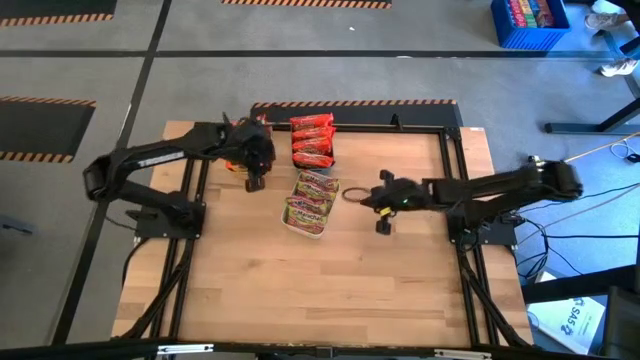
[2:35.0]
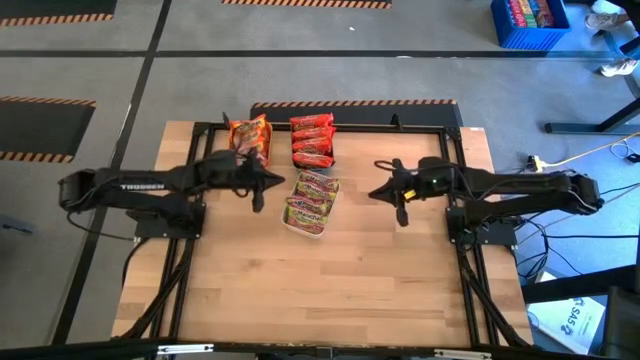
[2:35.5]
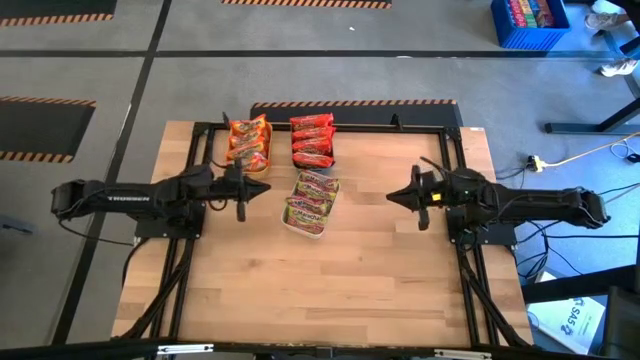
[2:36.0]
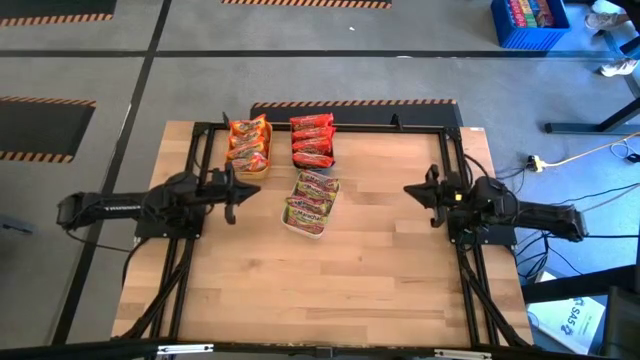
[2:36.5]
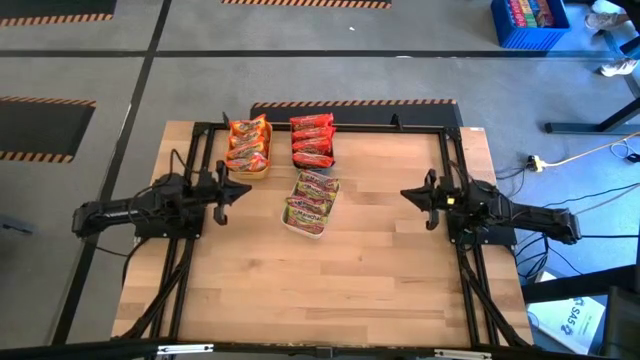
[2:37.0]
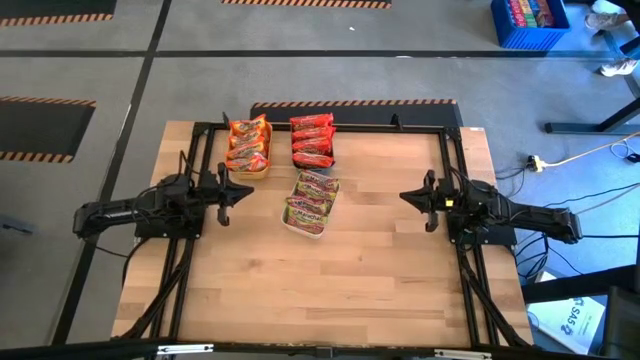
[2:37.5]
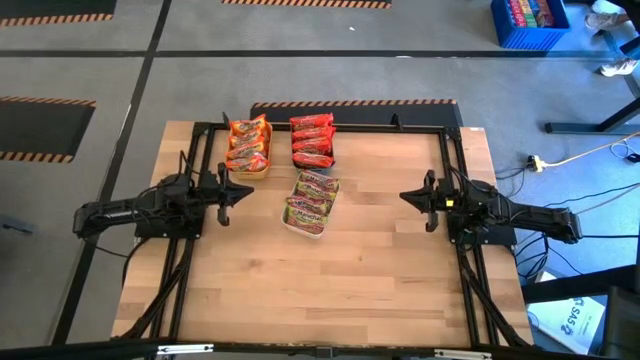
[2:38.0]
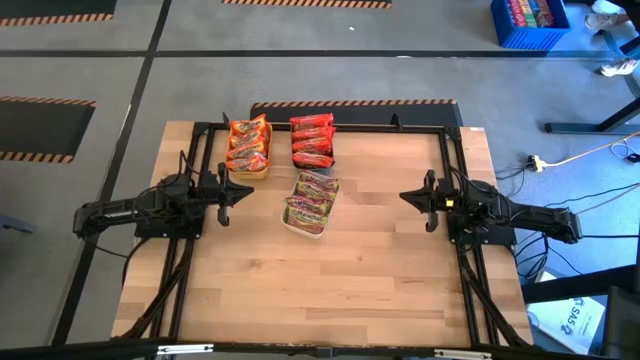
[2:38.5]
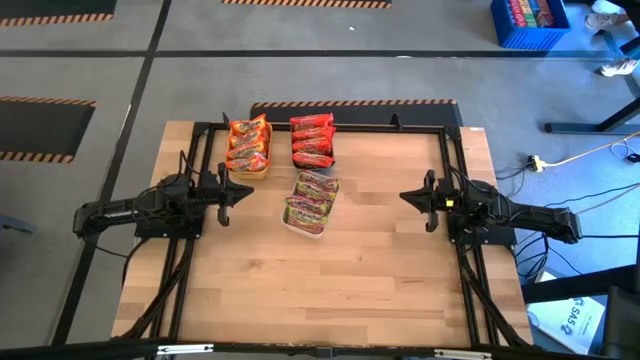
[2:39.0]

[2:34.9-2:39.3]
Task: Sort Maruchan noodles
Return To Home Position

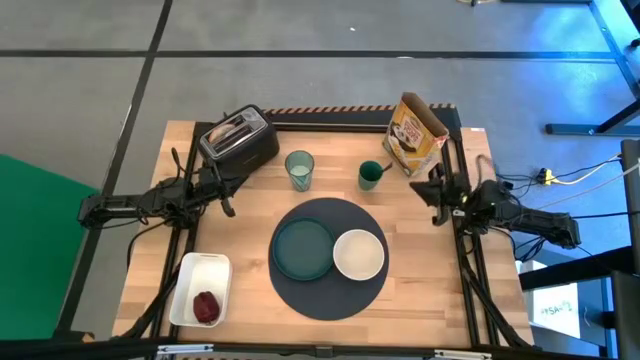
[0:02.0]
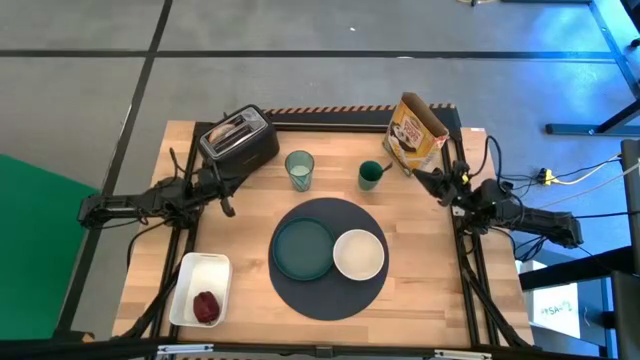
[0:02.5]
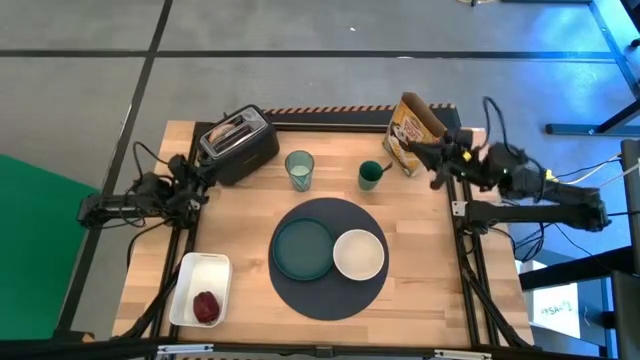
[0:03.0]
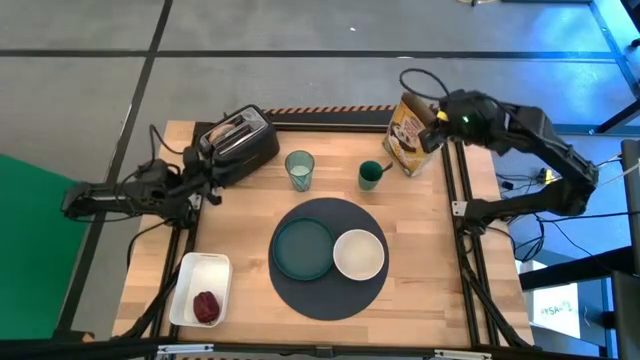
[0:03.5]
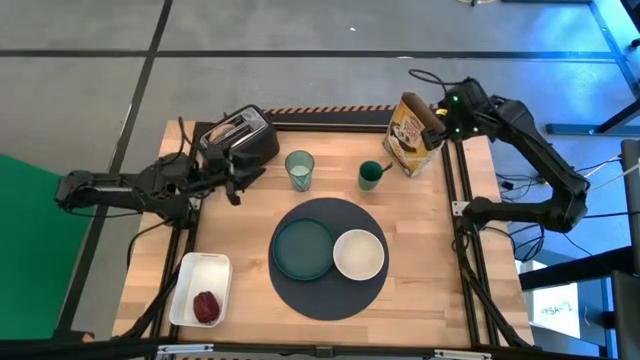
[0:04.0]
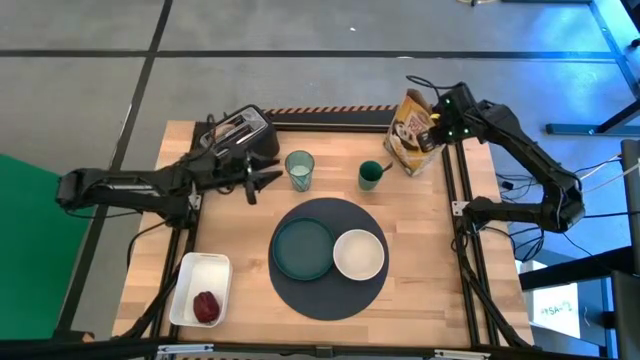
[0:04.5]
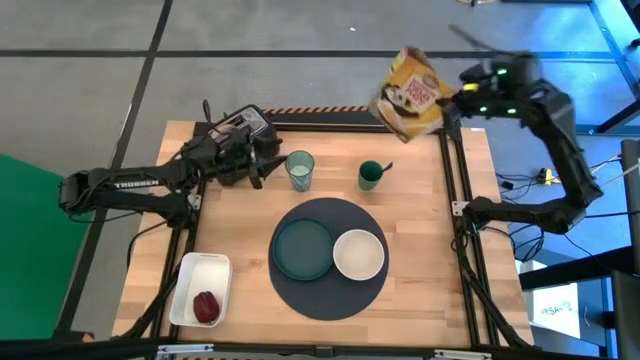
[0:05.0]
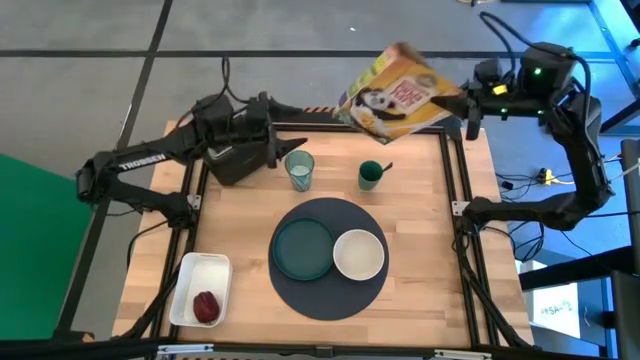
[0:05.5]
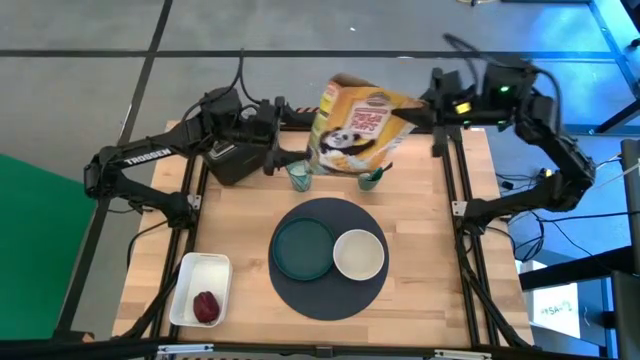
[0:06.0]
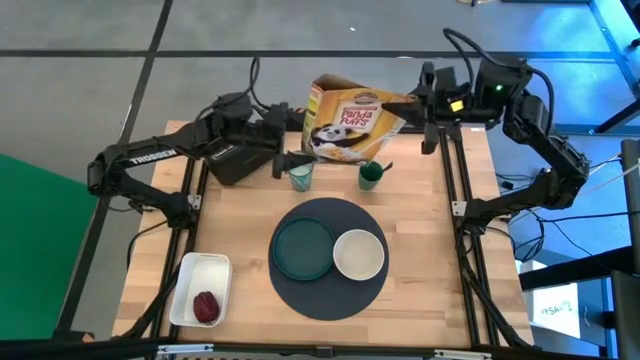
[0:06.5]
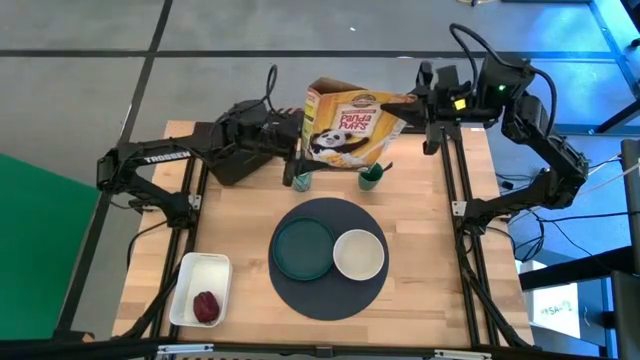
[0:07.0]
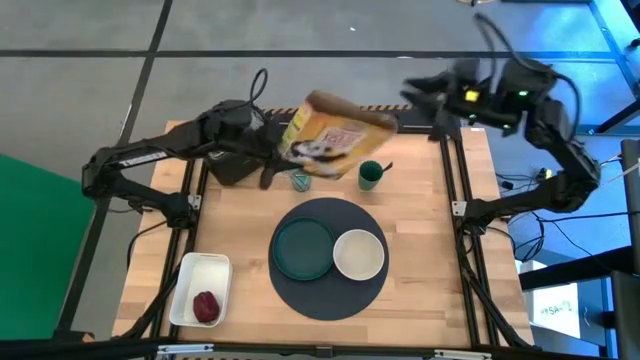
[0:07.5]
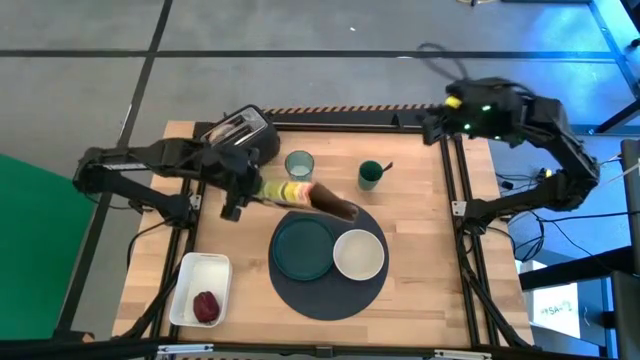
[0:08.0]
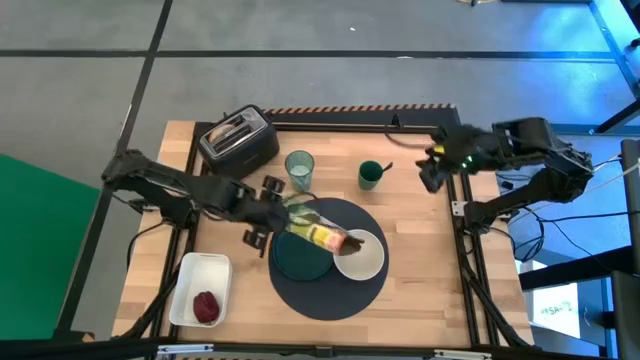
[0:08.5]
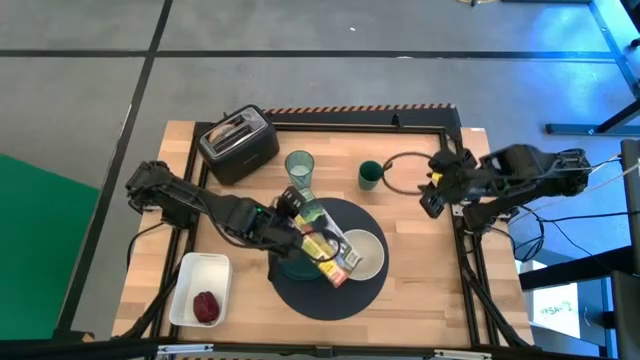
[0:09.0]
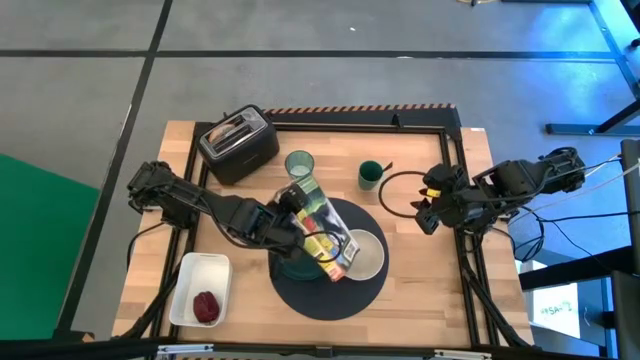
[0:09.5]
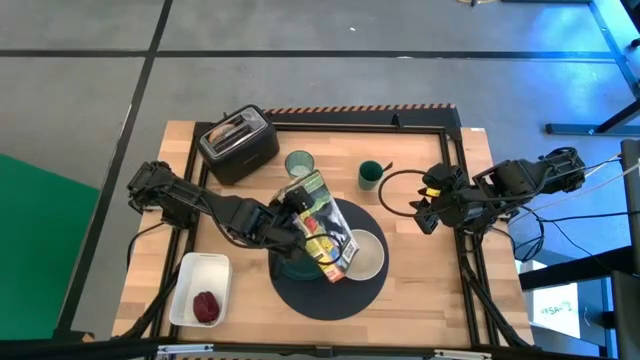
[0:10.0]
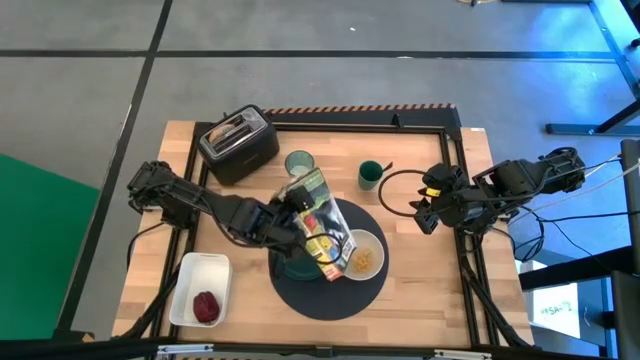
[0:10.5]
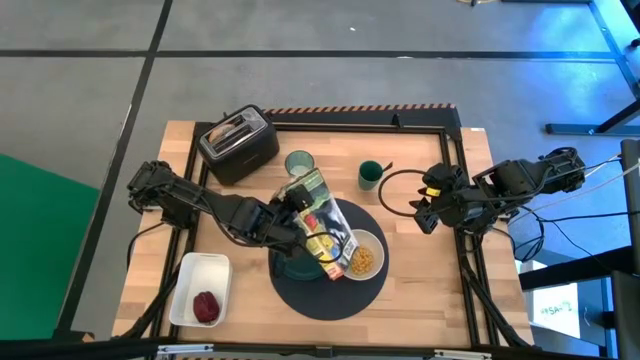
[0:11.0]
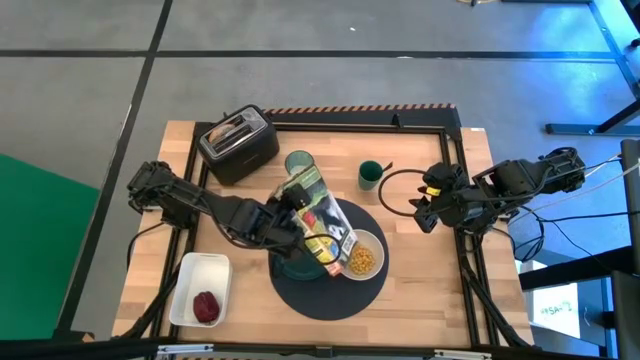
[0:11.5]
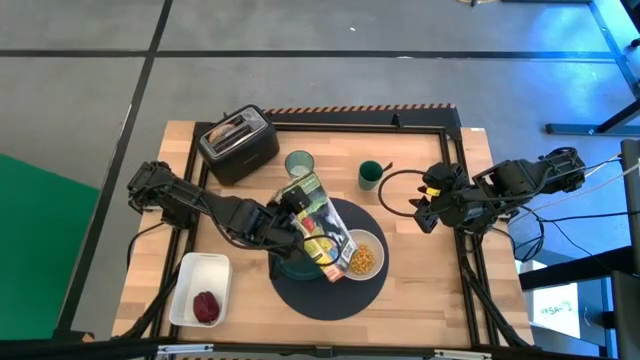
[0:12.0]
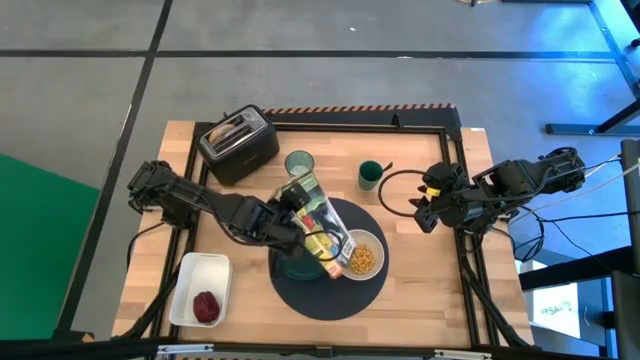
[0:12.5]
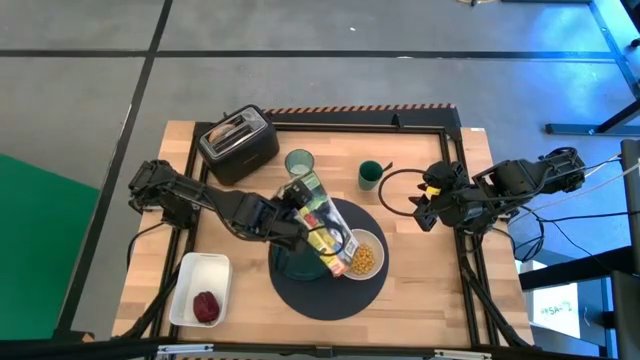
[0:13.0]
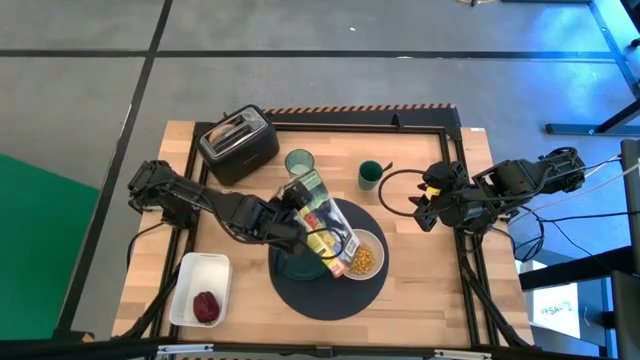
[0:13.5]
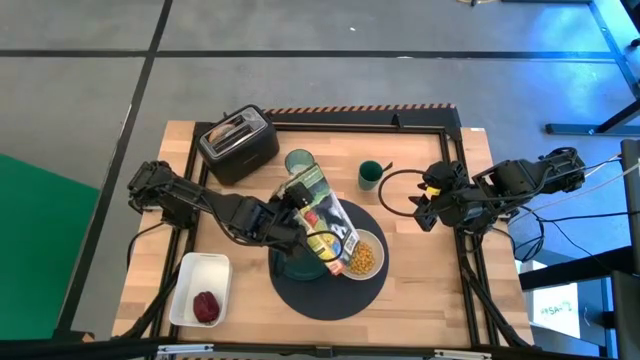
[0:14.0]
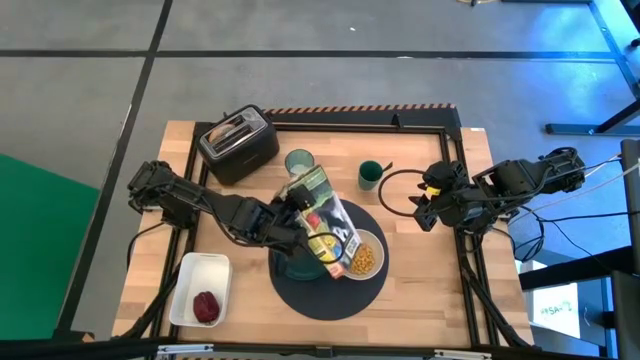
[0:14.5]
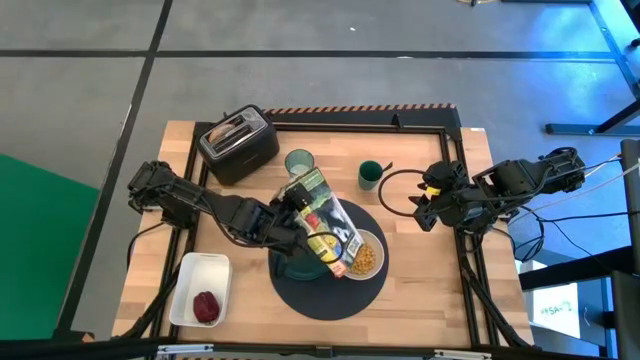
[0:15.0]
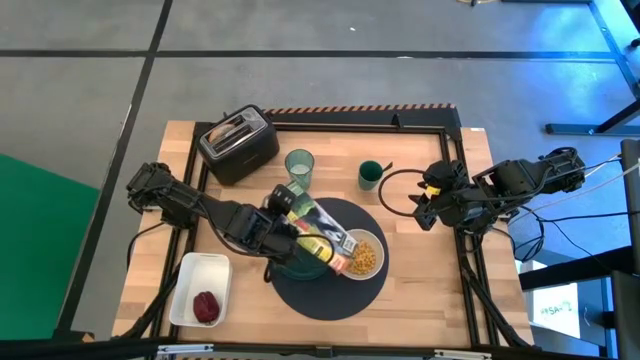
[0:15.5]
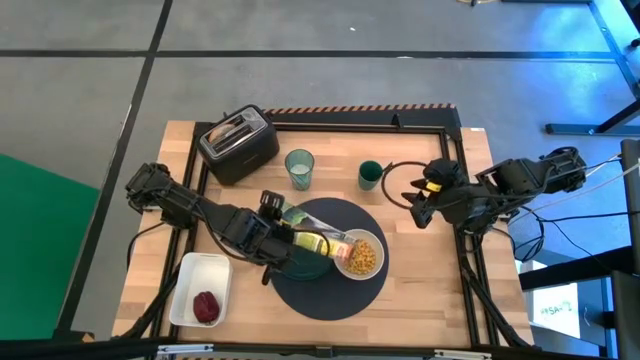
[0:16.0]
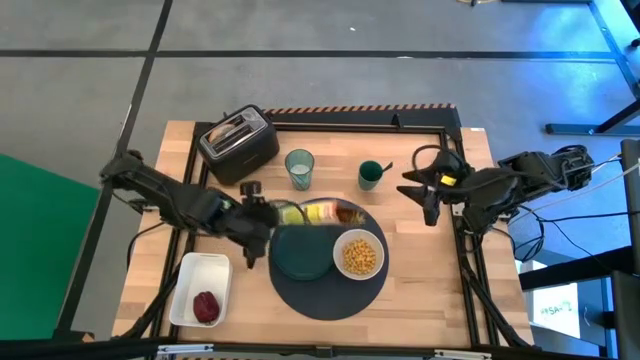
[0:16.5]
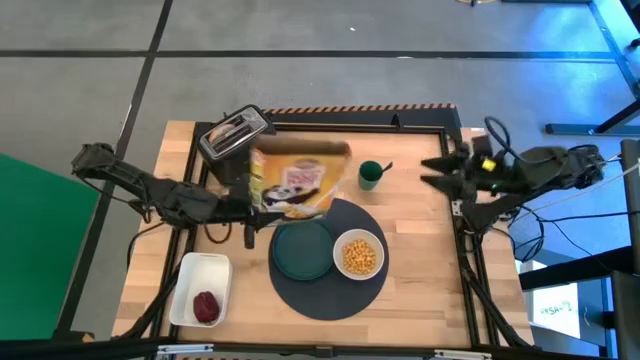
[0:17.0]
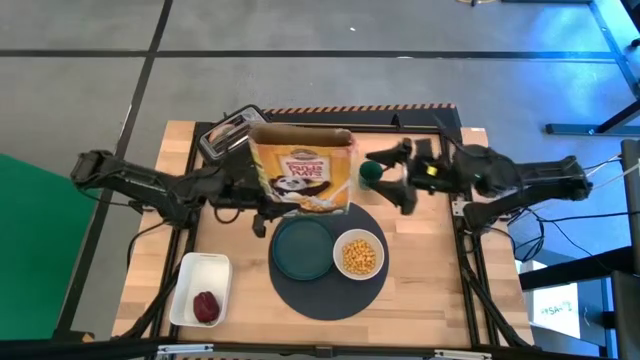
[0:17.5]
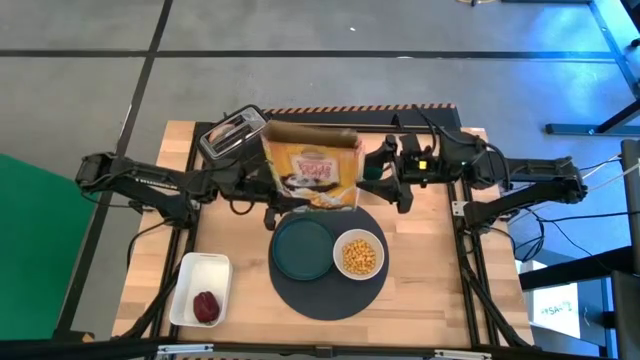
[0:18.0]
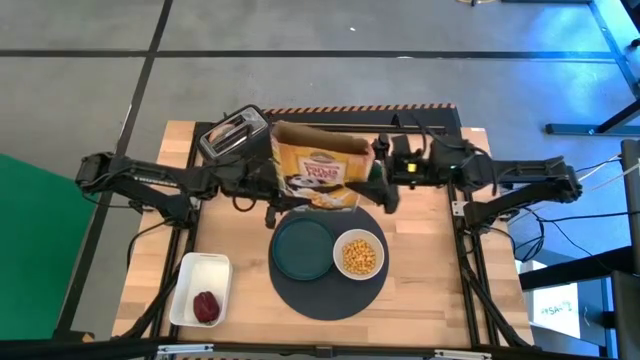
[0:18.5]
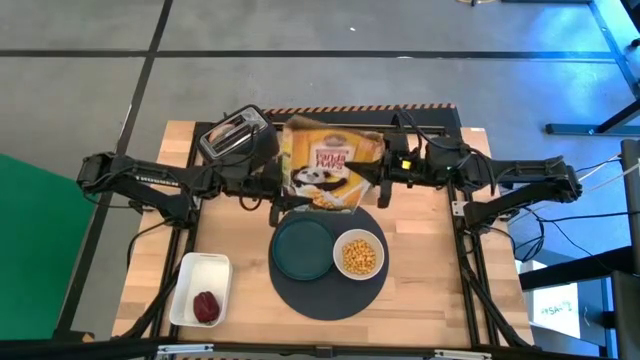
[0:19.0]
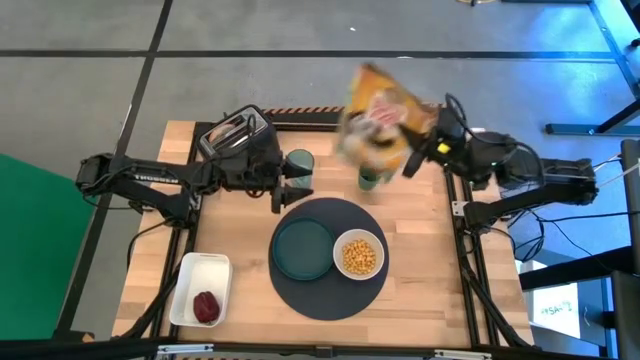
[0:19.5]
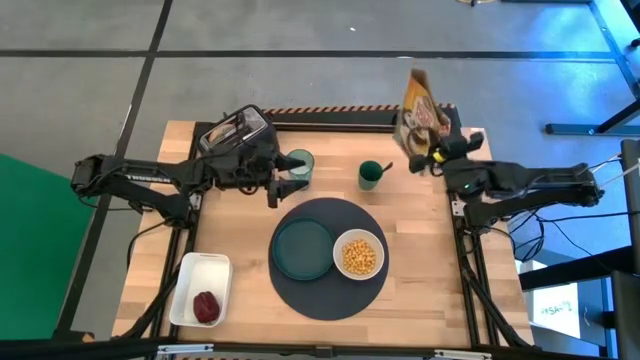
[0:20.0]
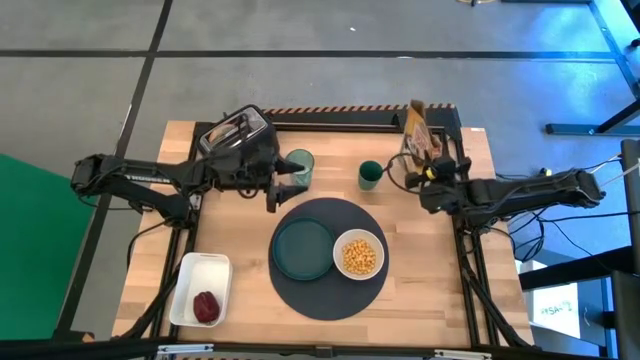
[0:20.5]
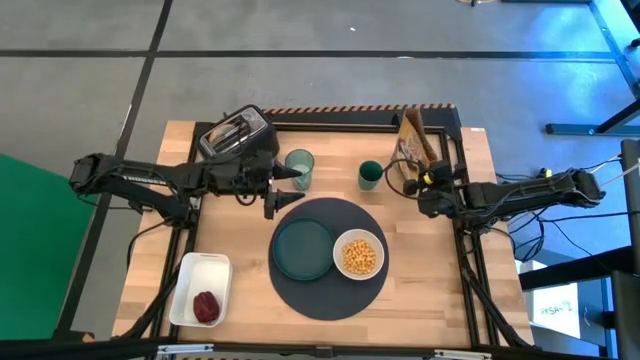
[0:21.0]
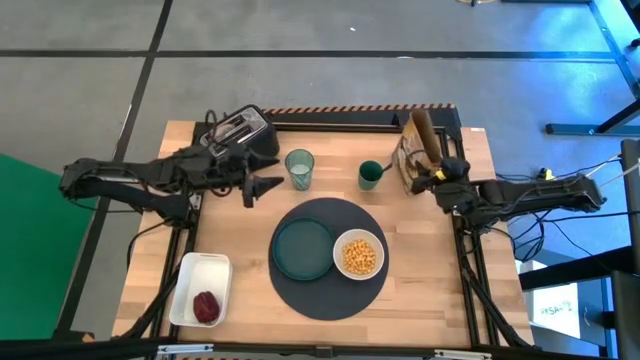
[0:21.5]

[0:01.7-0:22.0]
Task: Arrange a breakfast setting
Pour the cereal from the yellow cereal box into the white bowl
